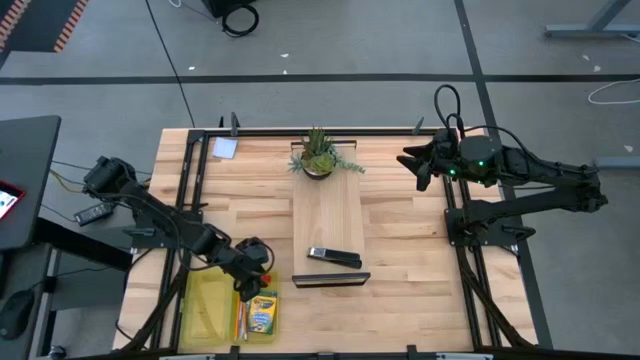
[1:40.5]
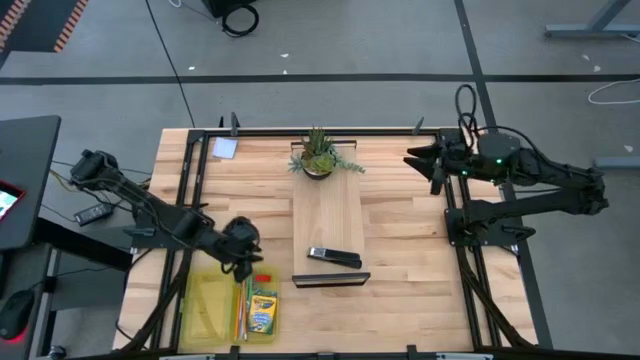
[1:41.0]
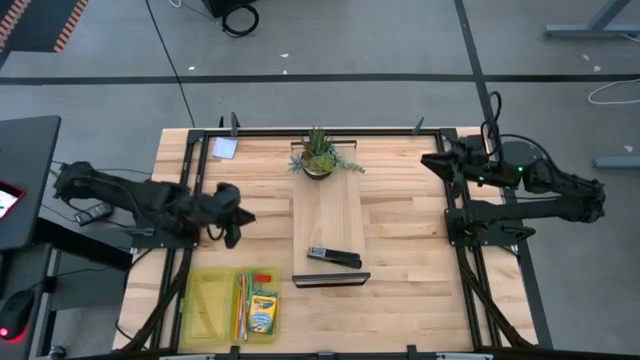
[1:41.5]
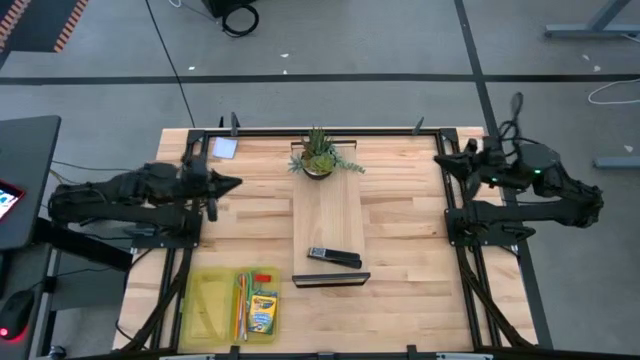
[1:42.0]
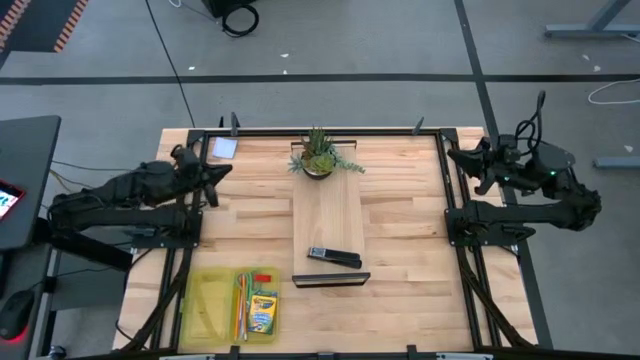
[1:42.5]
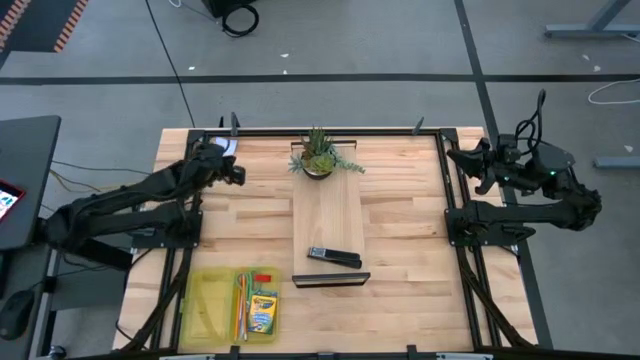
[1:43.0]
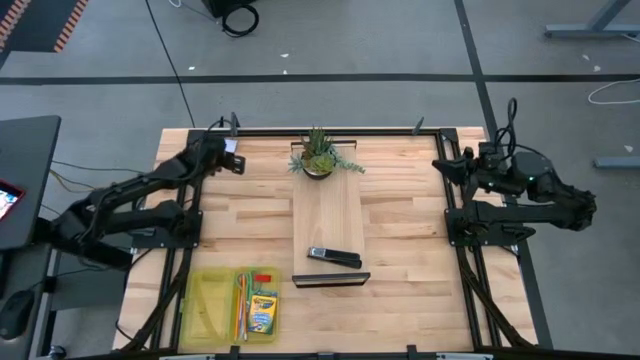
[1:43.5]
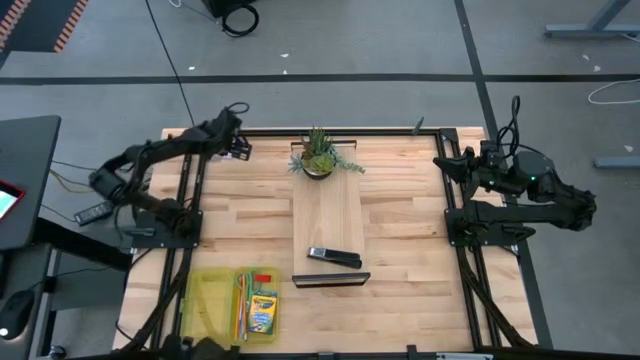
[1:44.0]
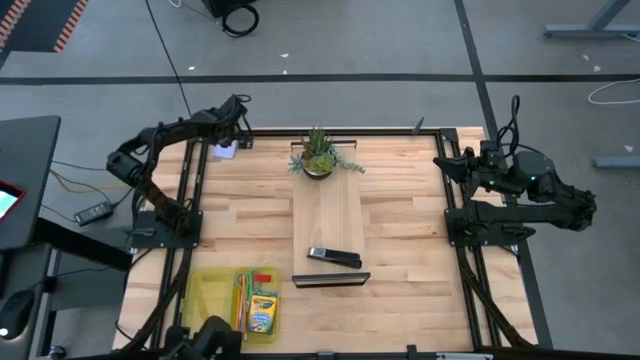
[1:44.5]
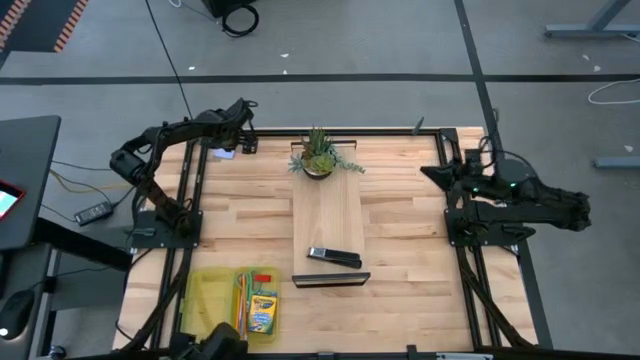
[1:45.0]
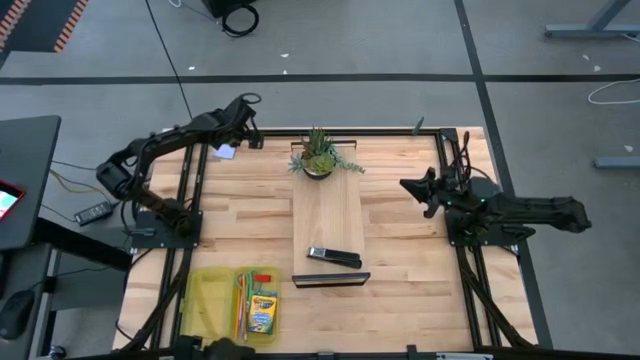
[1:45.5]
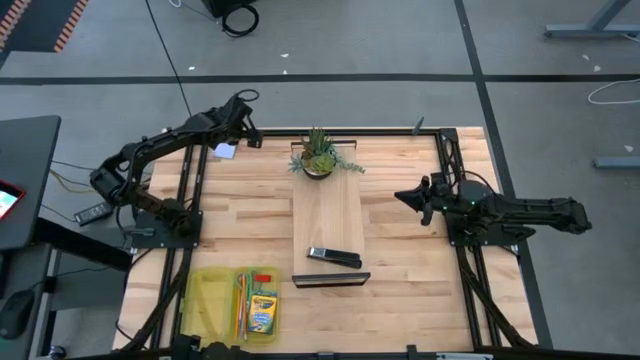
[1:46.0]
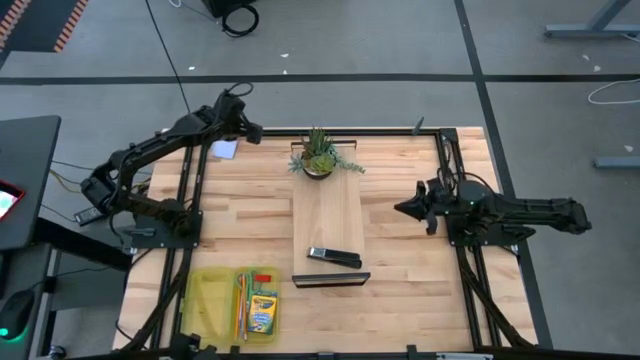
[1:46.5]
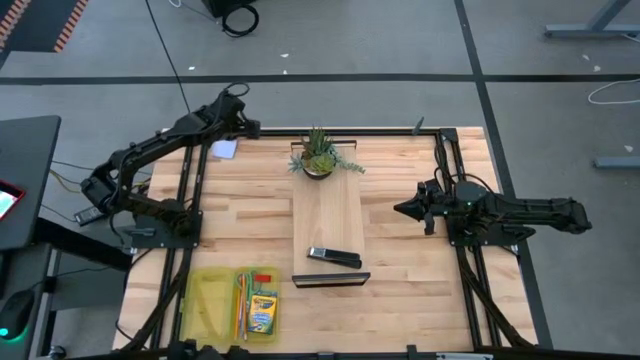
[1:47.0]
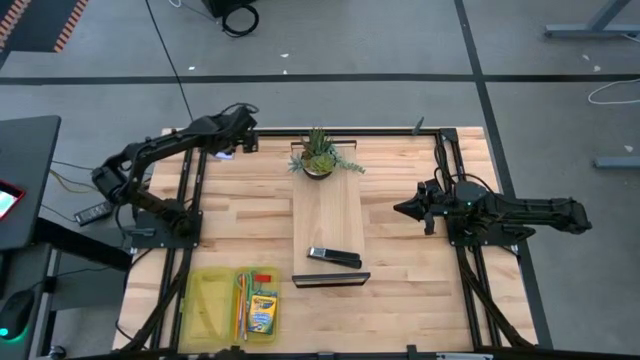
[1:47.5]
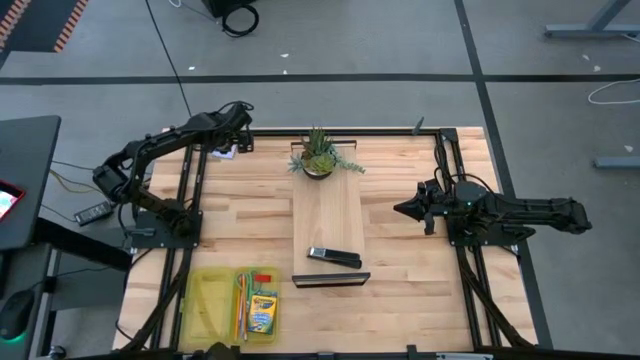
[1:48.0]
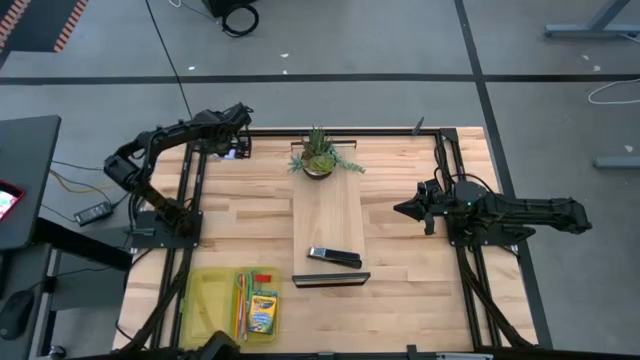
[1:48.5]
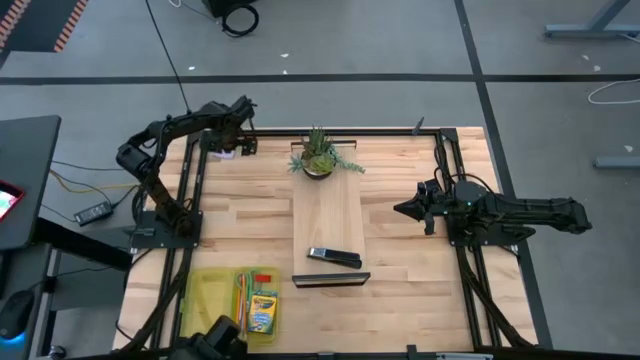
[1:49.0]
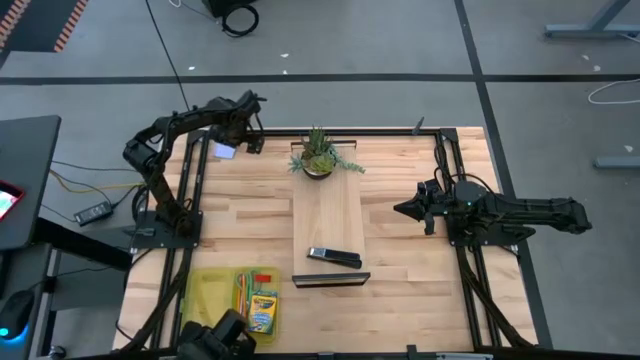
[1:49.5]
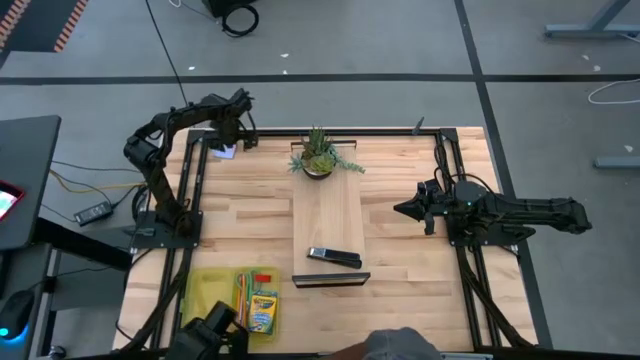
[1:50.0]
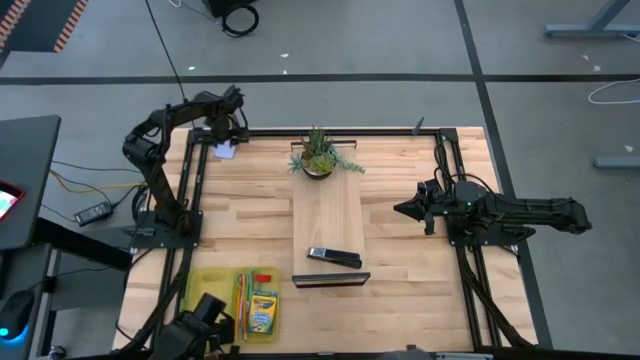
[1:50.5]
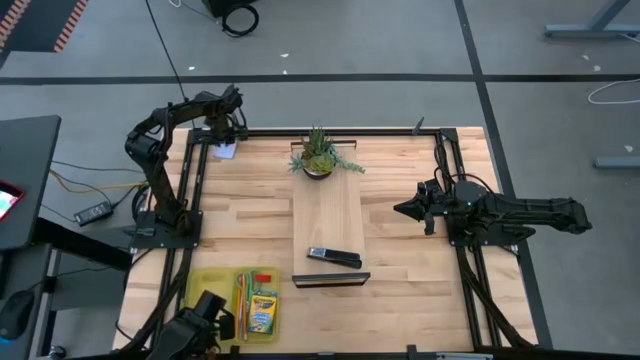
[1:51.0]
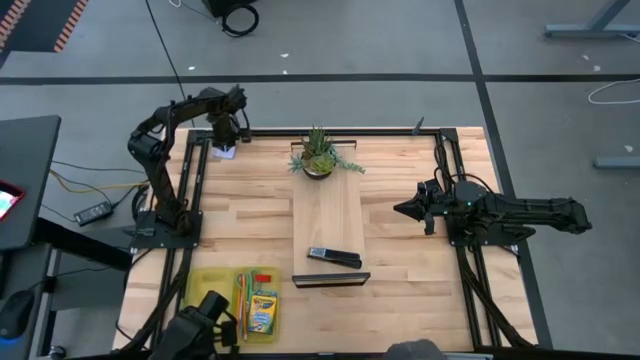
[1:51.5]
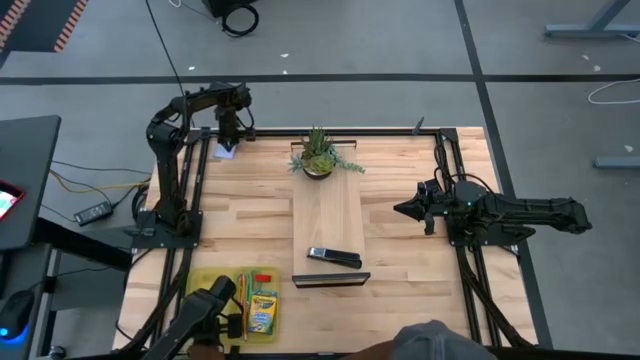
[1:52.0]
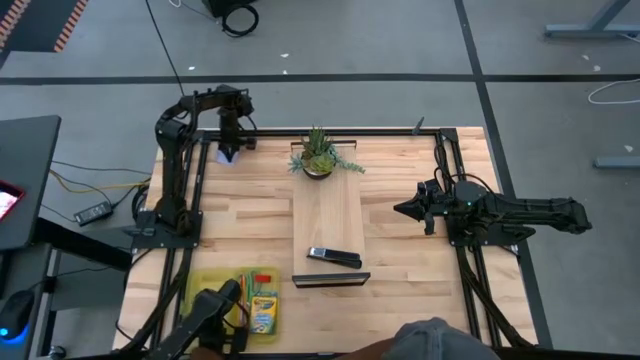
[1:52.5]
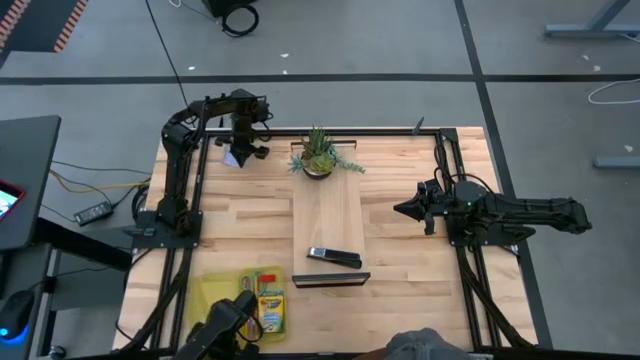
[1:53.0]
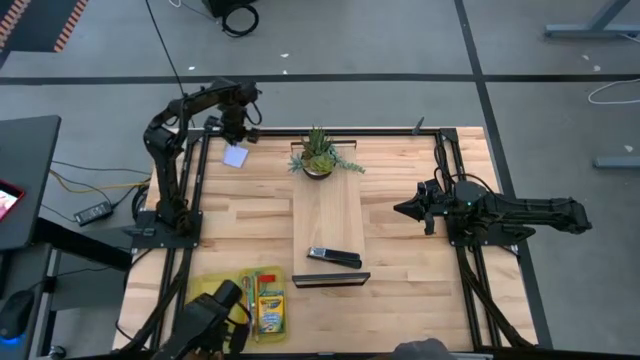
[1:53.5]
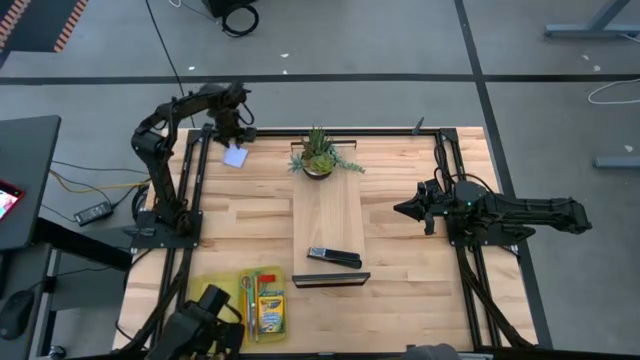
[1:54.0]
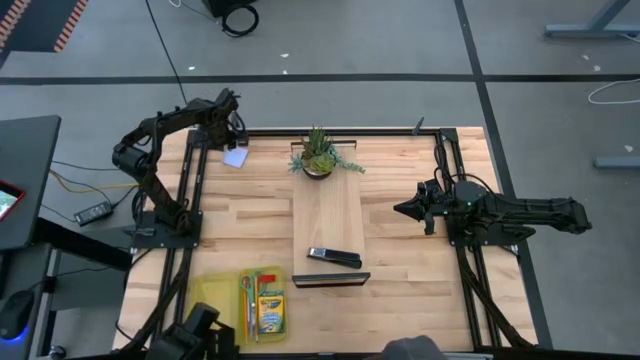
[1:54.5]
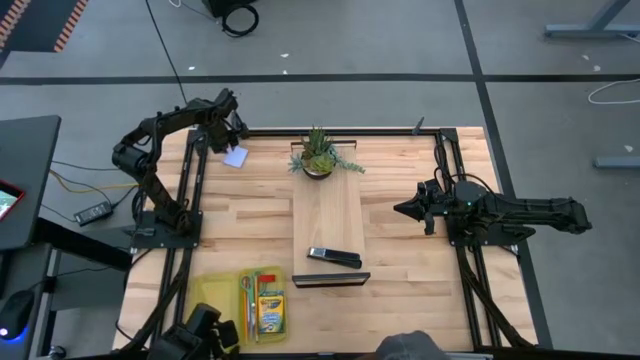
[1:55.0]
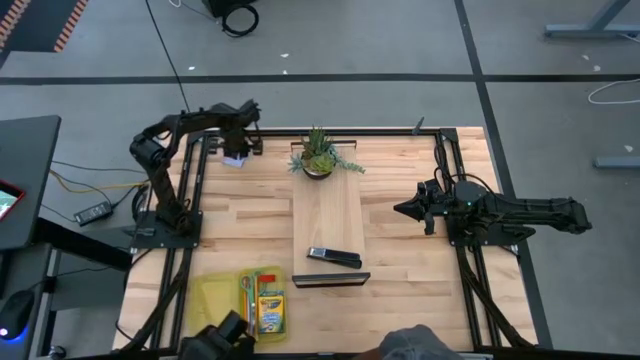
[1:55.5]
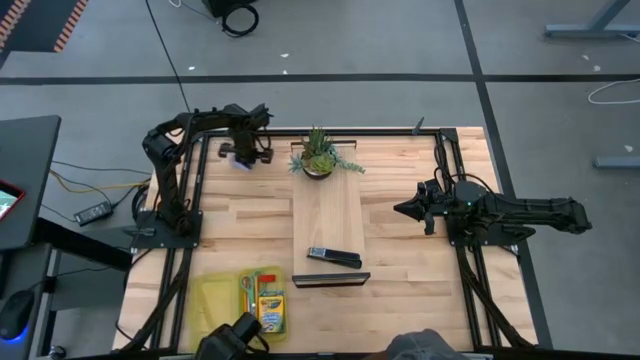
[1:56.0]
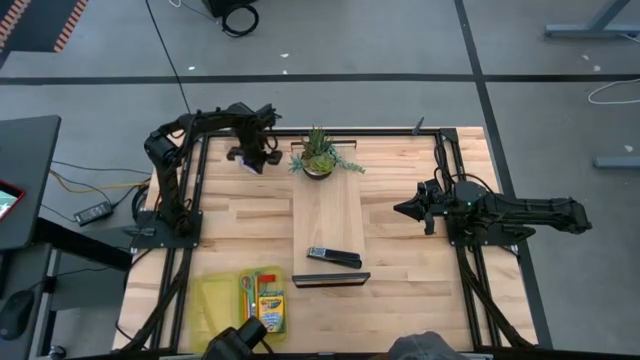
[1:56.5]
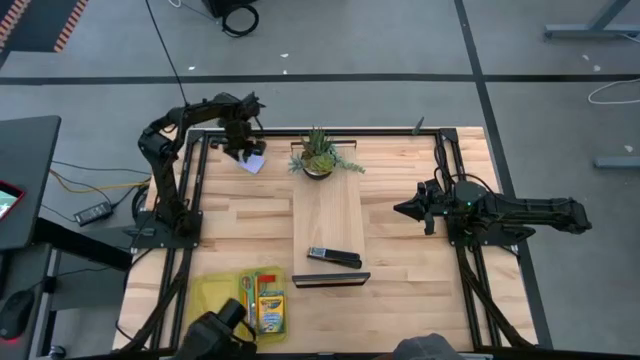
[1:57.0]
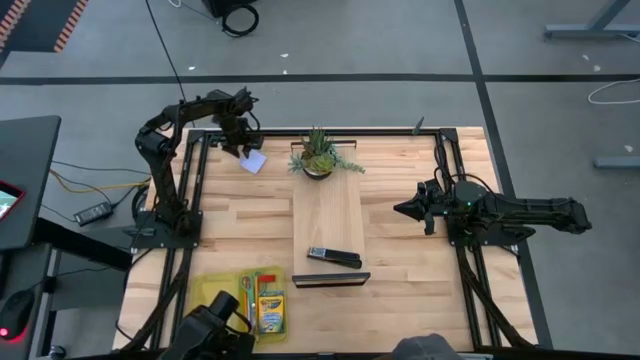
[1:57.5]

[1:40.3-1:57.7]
Task: Pack school essentials
Put the blue sticky note into the yellow supply box
